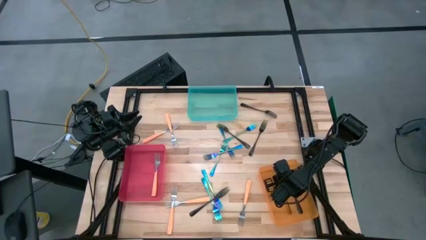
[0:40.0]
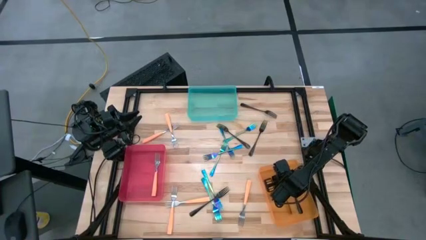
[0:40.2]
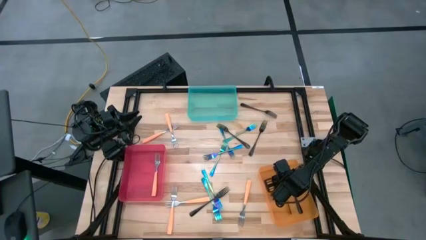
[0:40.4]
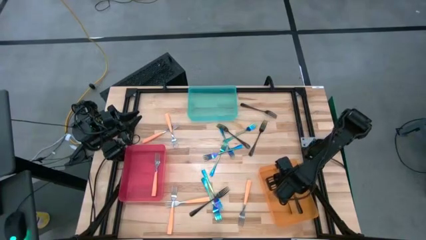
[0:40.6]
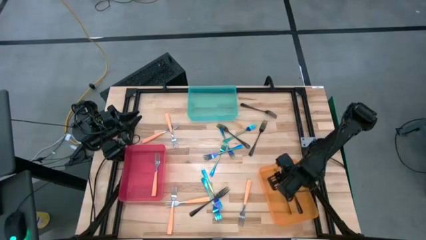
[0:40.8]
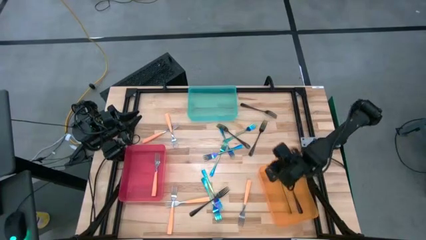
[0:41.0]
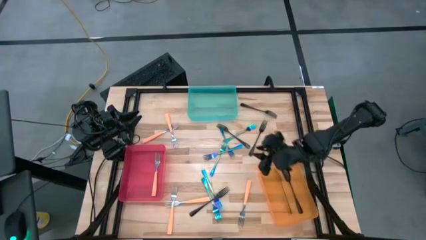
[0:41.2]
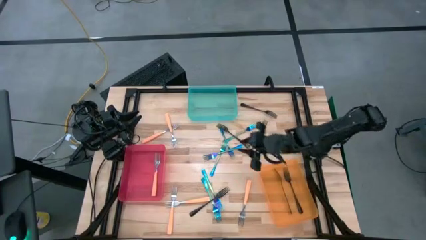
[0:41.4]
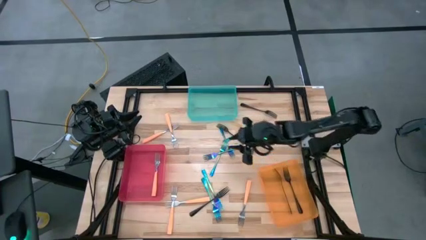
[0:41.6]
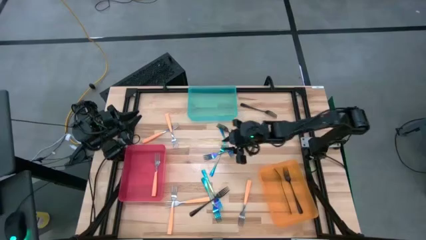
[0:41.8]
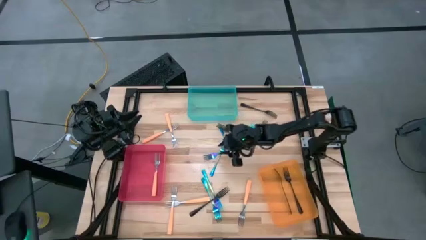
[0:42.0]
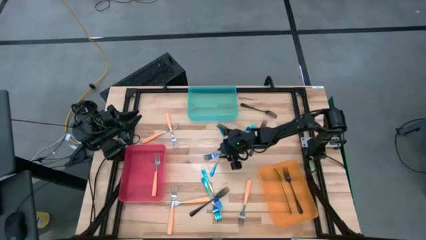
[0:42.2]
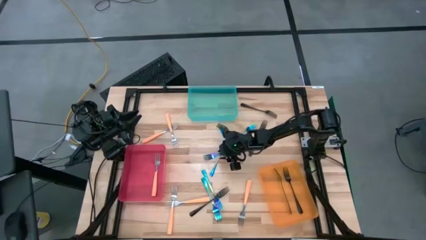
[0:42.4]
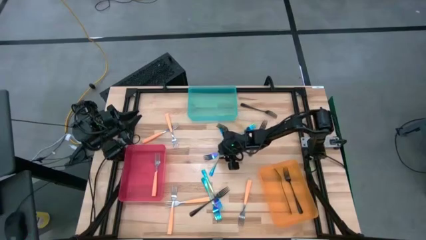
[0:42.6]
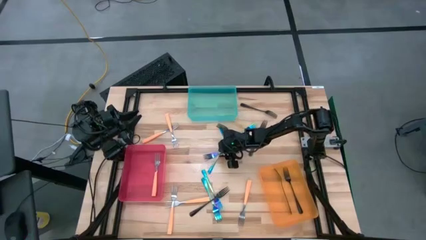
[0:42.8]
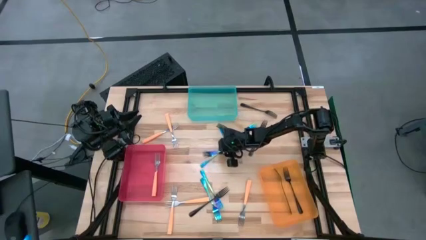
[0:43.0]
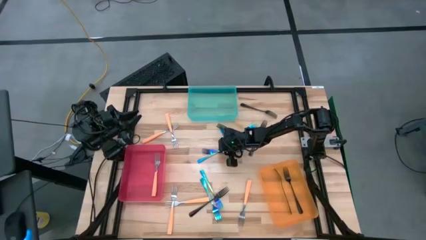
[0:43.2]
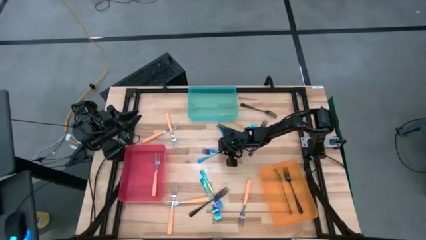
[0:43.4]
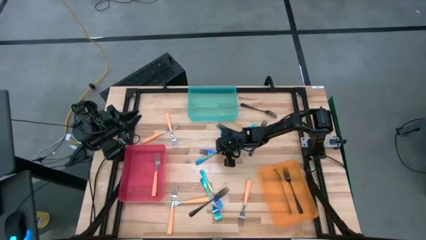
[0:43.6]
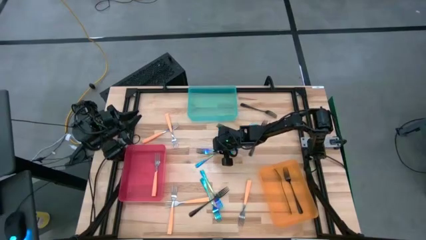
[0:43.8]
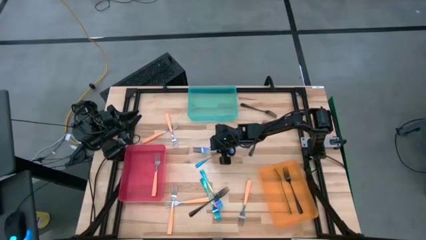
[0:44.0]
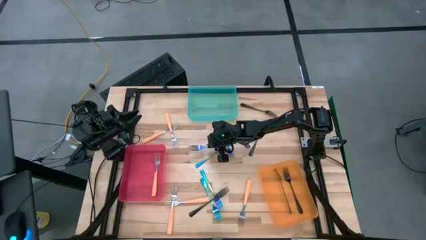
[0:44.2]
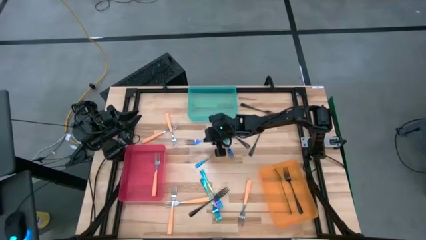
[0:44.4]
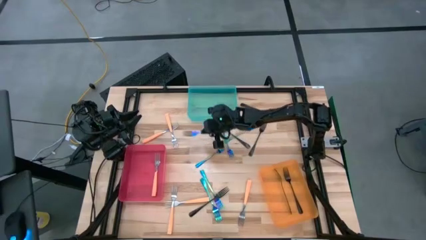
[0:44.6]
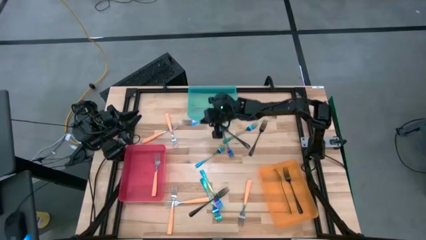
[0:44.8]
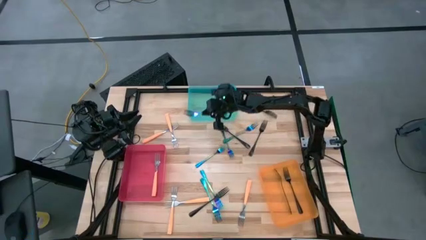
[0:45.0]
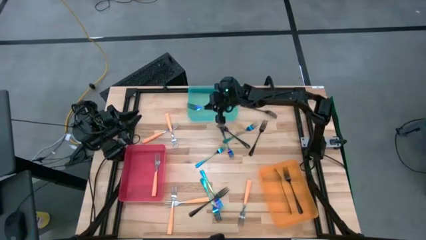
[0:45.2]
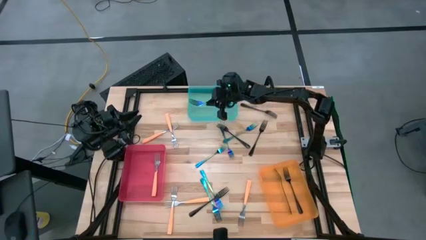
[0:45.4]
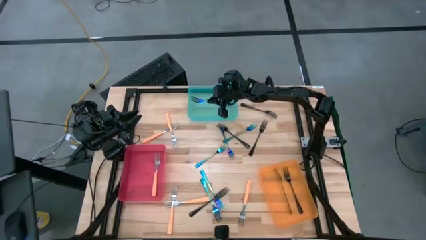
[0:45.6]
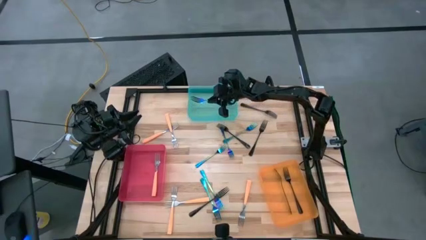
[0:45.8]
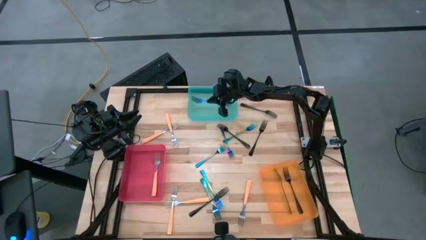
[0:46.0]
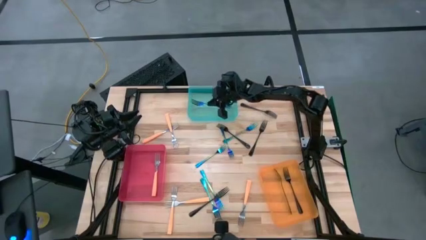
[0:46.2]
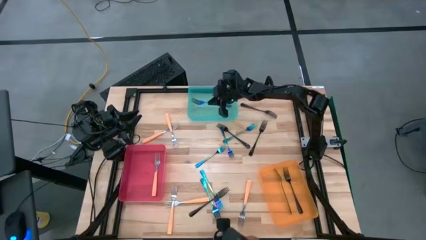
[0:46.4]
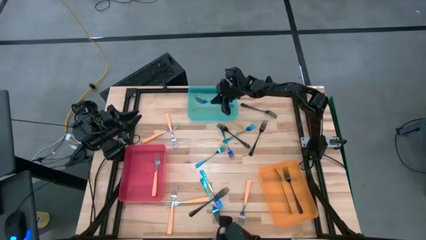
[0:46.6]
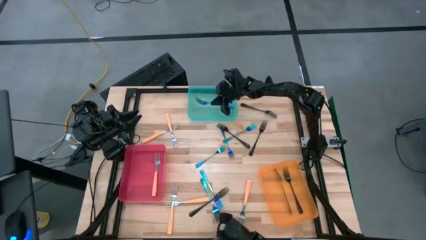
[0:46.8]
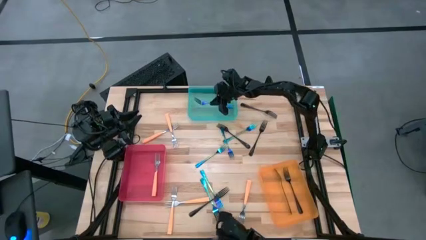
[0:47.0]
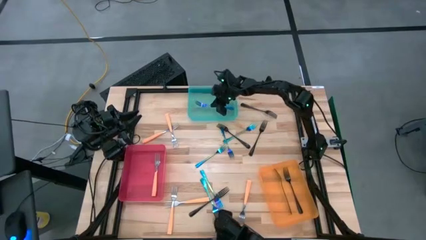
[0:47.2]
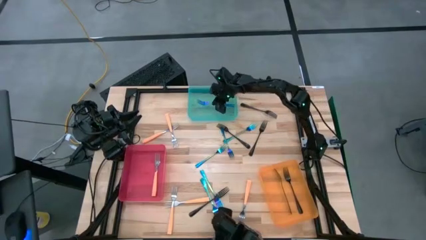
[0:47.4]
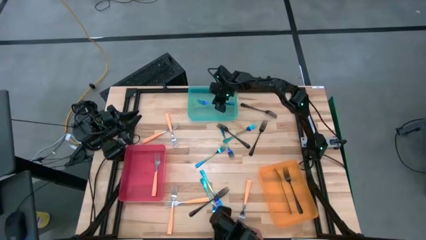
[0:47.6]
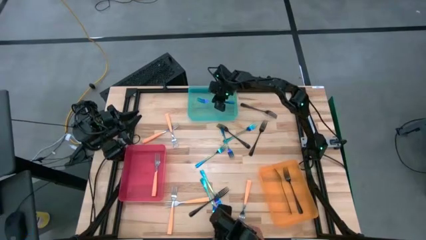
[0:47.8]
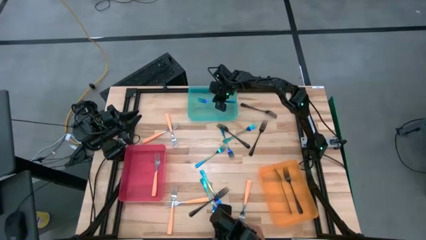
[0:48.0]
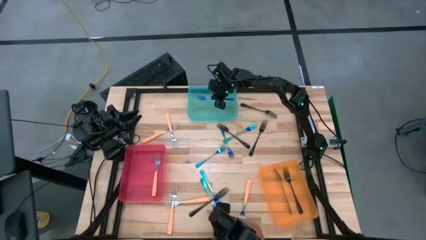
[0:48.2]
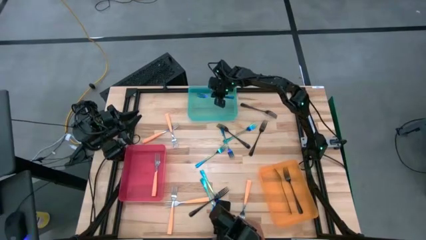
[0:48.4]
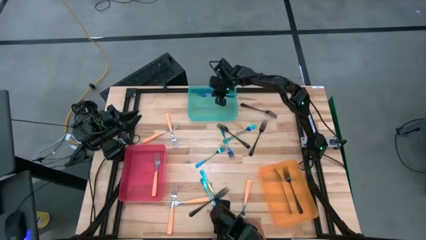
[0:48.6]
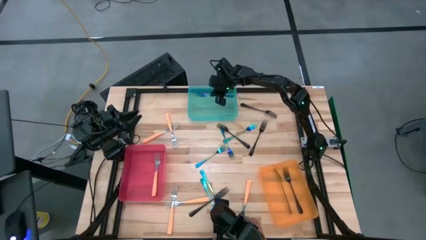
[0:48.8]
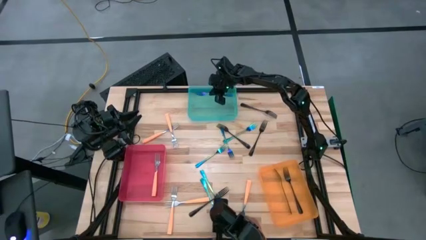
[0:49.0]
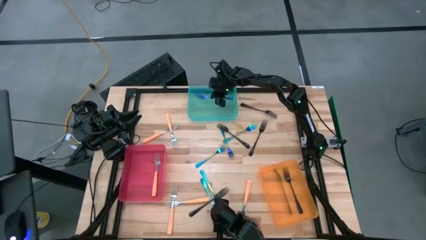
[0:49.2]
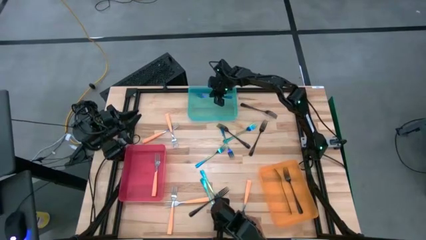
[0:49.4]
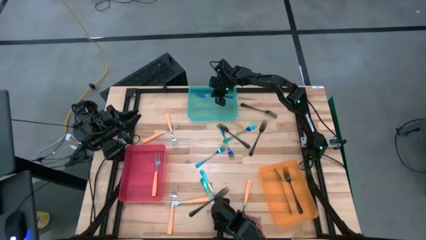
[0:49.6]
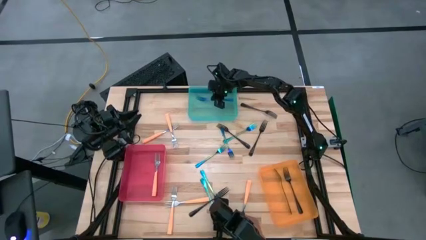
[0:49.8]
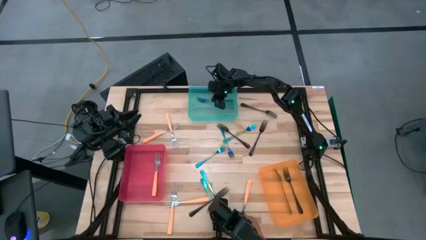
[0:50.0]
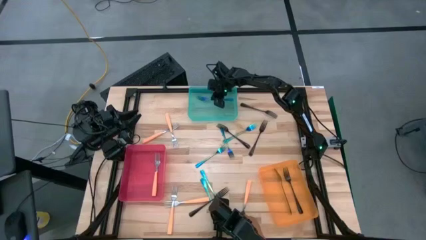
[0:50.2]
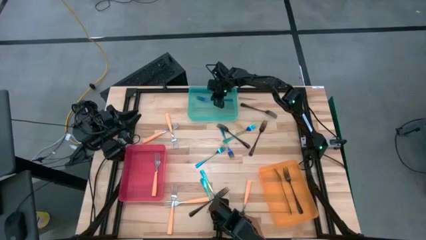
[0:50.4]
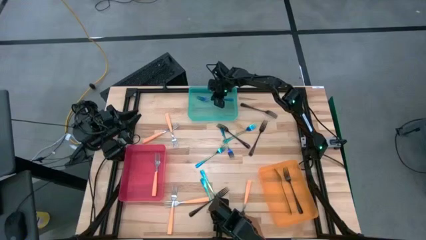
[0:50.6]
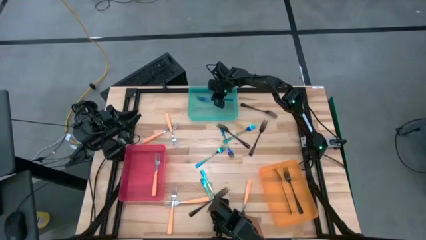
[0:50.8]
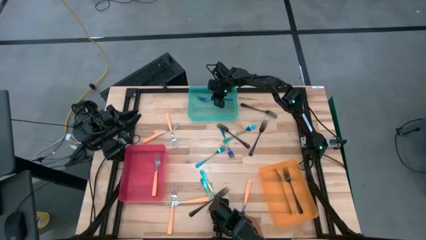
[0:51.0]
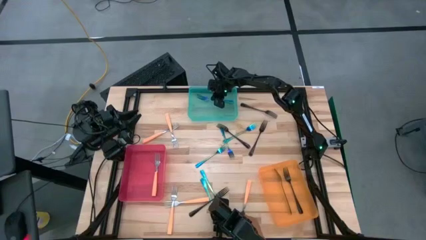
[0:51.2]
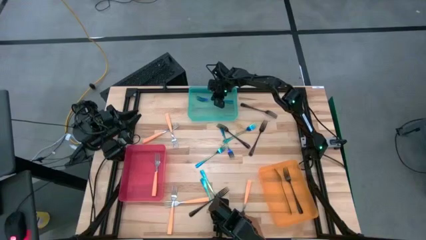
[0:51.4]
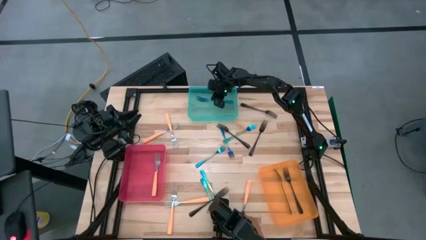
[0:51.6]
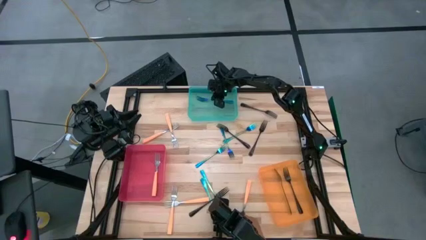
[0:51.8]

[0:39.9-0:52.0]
Task: Sort silverware by color (type)
Put the blue fork into the blue bin

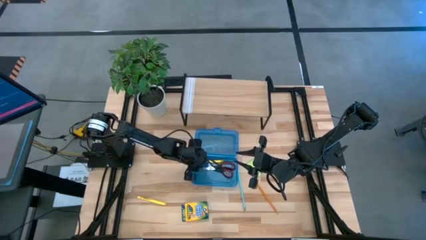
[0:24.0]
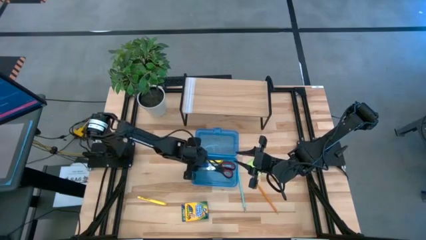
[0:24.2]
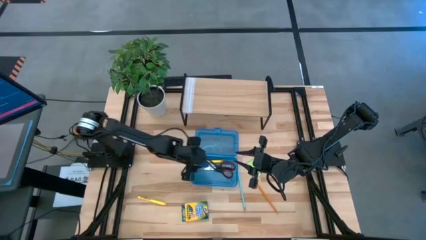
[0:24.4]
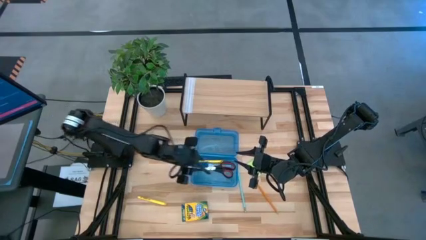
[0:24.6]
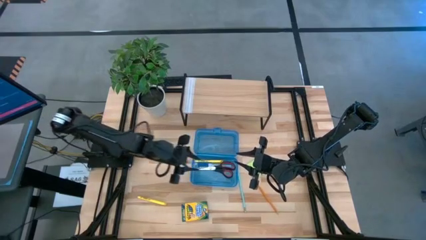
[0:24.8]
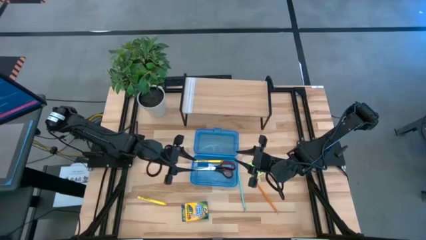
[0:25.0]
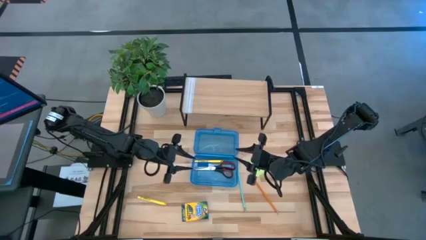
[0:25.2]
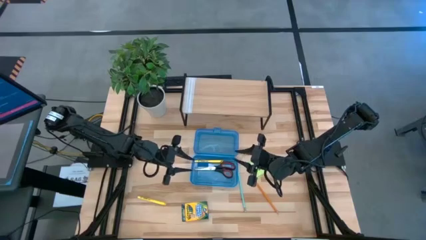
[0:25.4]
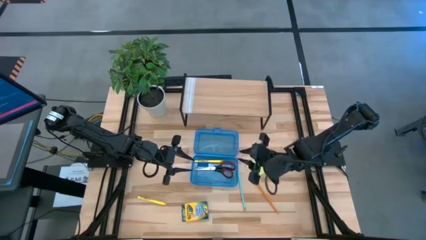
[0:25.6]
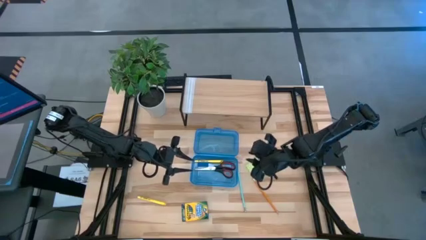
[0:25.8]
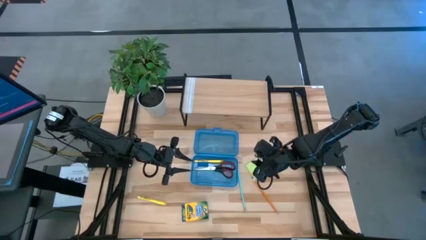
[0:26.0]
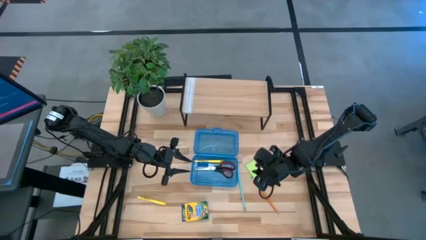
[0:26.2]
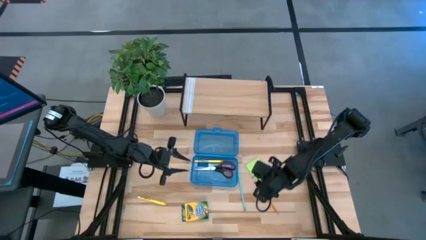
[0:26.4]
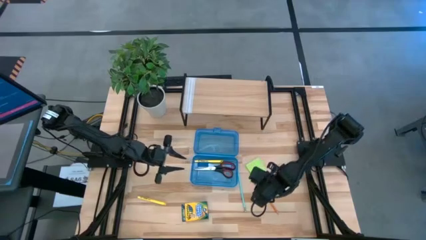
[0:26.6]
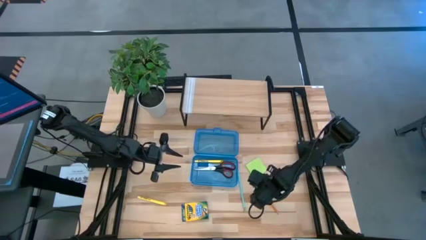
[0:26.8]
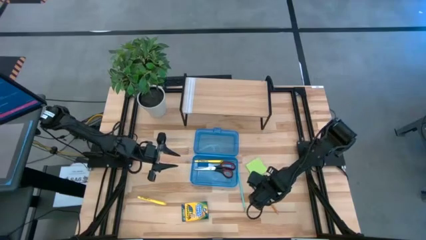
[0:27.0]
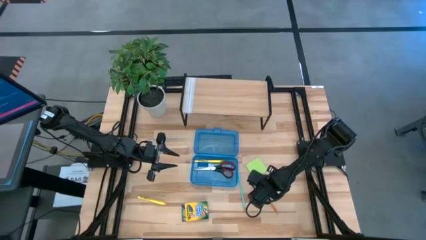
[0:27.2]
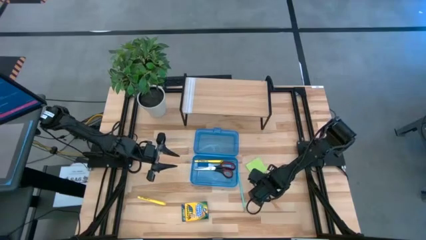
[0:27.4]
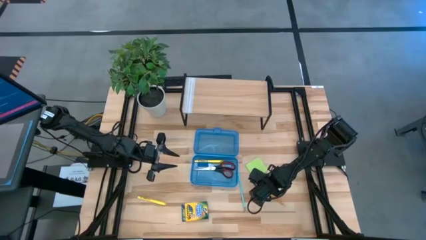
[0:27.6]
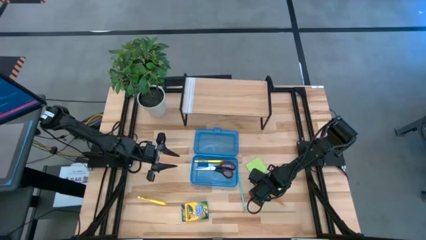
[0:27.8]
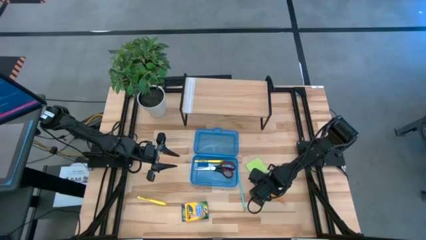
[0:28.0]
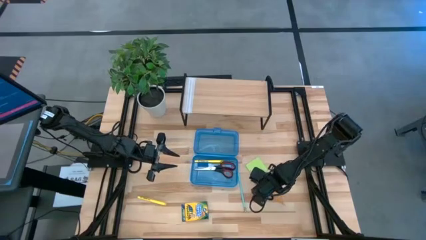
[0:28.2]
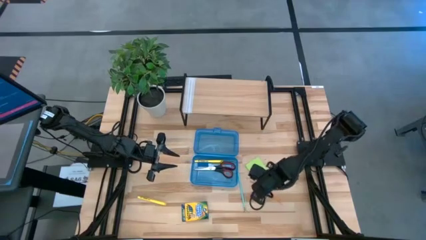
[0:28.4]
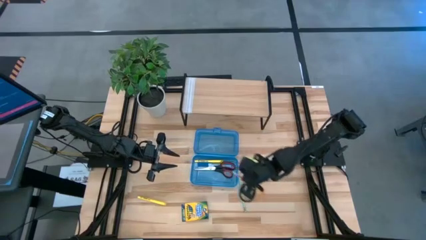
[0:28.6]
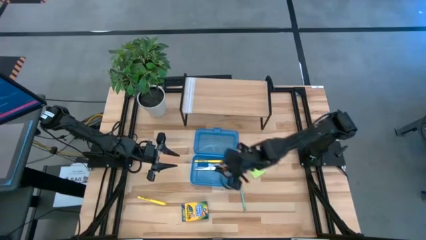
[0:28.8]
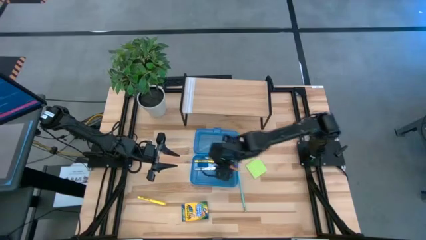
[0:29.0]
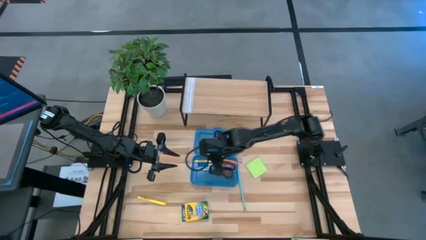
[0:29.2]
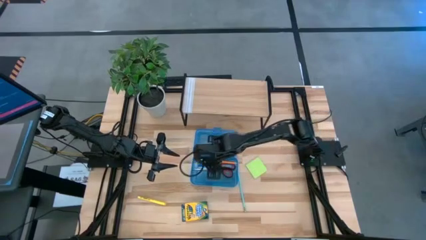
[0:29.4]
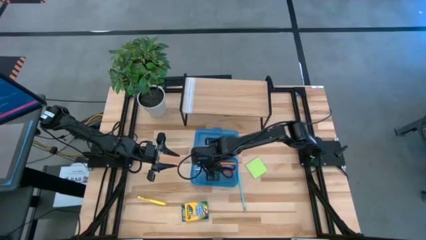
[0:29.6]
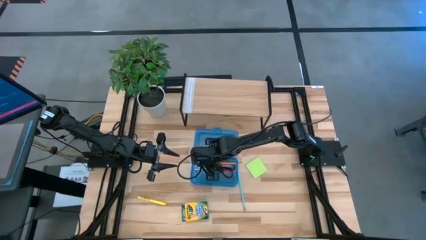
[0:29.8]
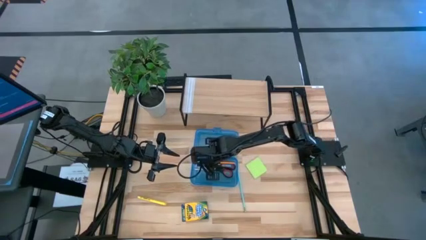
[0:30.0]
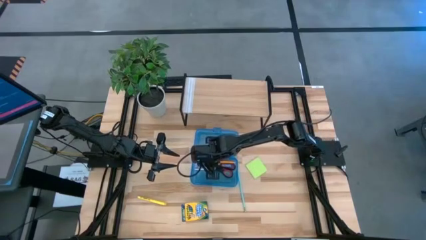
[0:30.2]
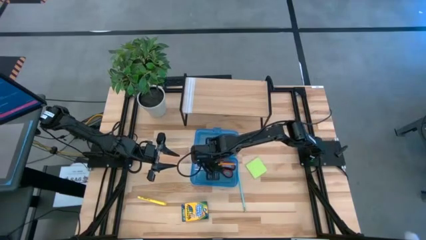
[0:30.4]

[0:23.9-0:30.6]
Task: Pack school essentials
Put the orange pencil into the blue supply box
